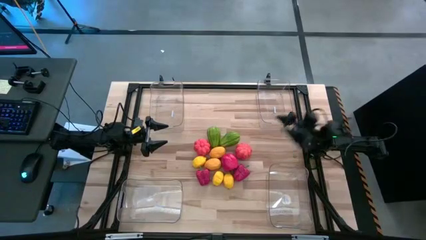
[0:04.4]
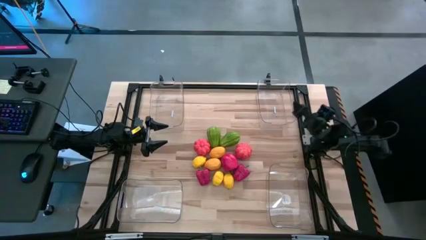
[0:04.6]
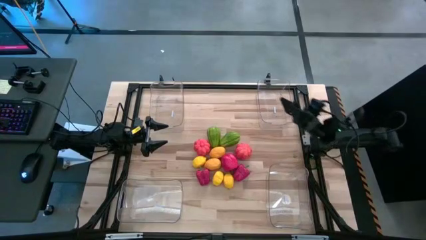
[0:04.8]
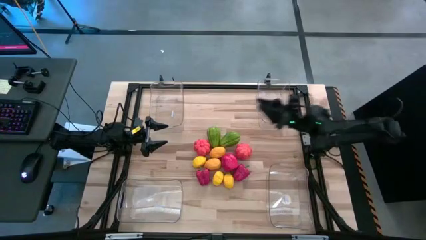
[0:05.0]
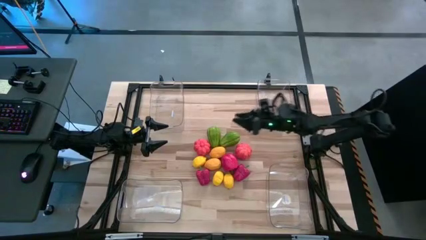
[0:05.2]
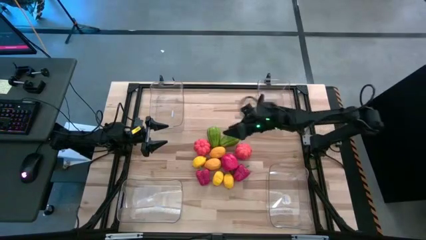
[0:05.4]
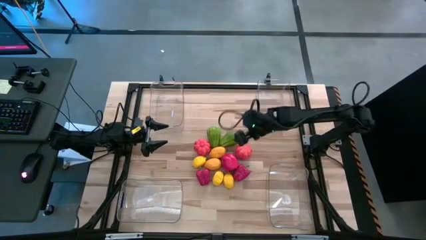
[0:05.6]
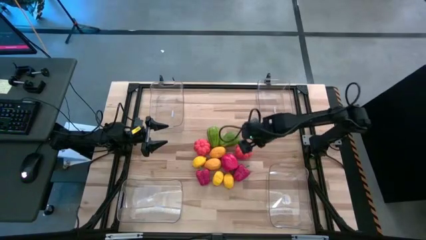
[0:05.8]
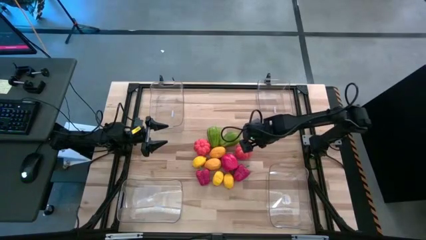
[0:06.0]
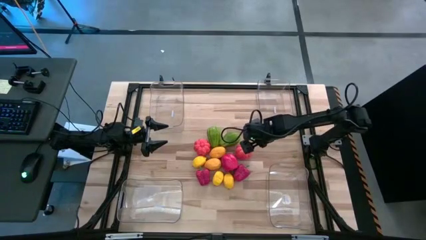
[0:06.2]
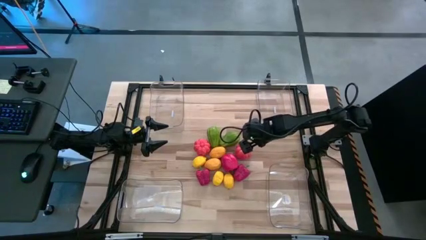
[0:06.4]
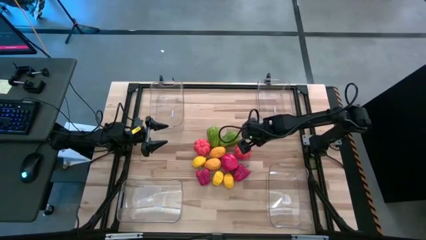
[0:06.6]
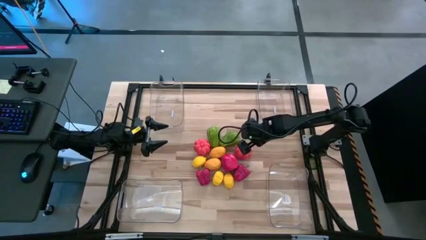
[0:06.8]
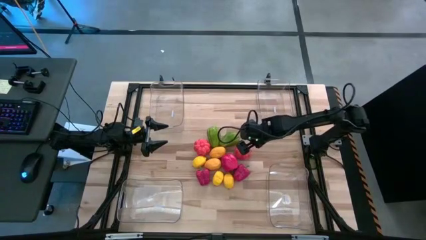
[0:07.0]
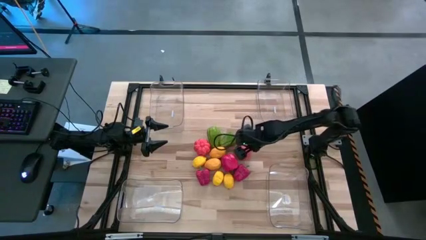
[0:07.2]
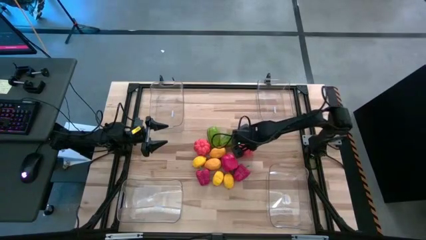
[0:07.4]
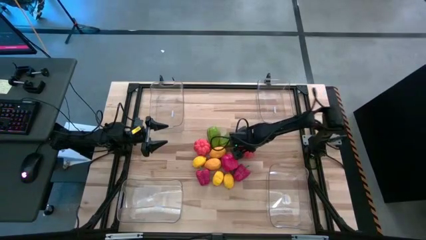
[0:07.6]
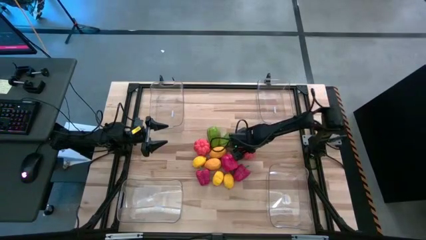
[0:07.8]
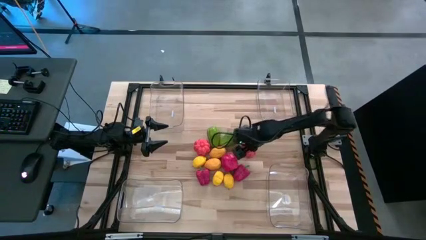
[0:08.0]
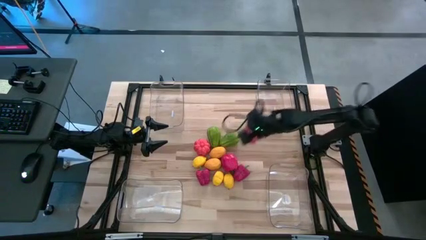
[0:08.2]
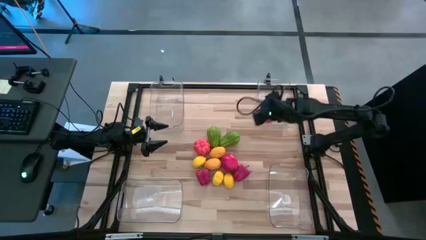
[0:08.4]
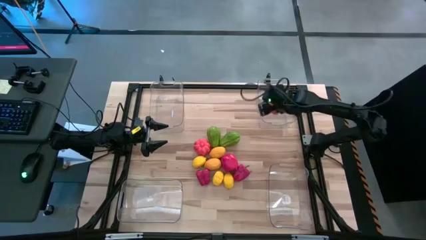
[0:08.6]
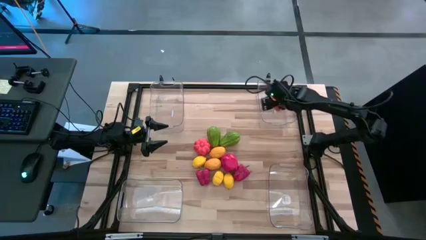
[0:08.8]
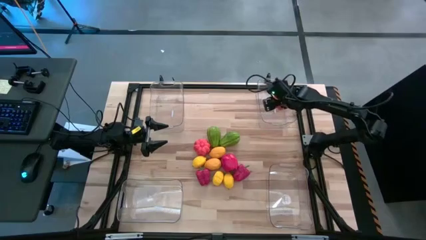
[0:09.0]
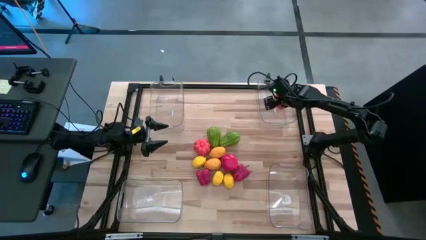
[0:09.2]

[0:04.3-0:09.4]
Task: Sort produce into baskets
Put the orange pumpkin into the top right transparent bin

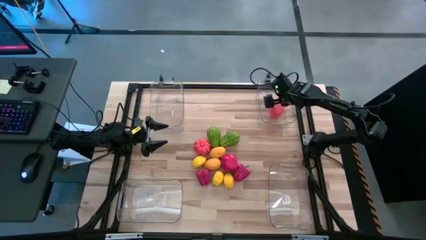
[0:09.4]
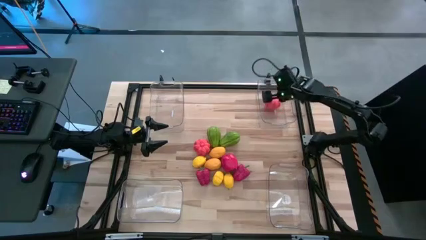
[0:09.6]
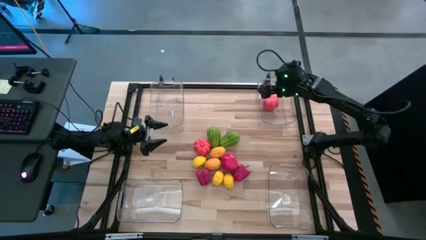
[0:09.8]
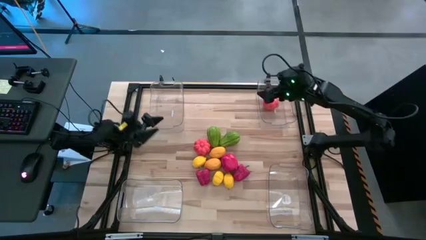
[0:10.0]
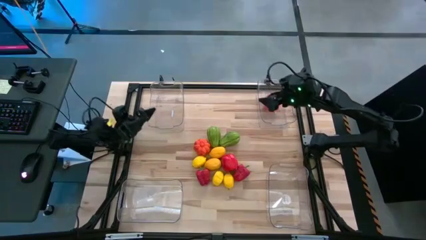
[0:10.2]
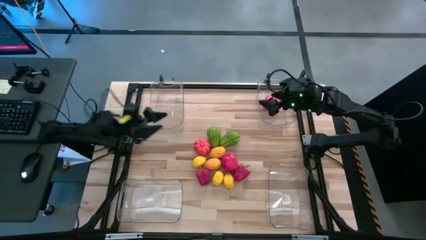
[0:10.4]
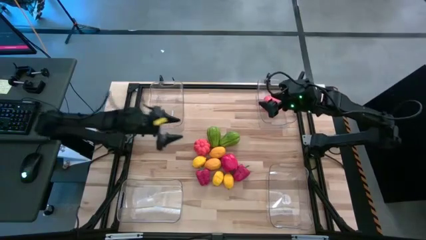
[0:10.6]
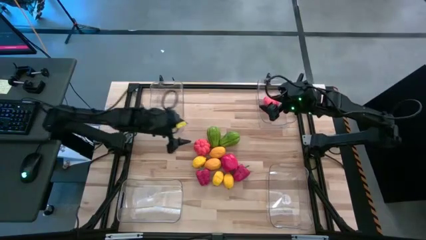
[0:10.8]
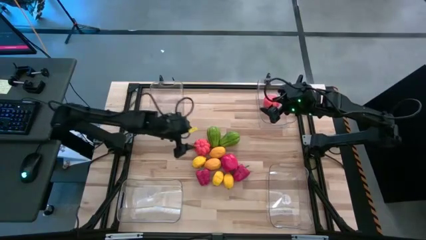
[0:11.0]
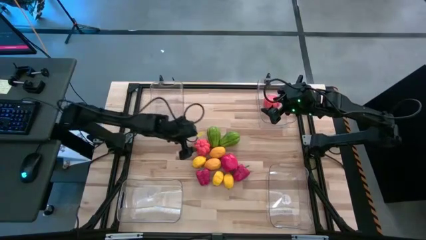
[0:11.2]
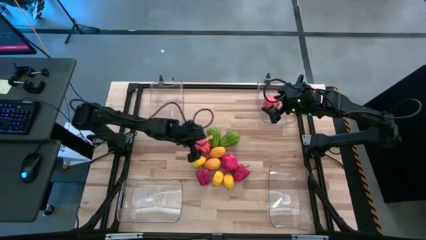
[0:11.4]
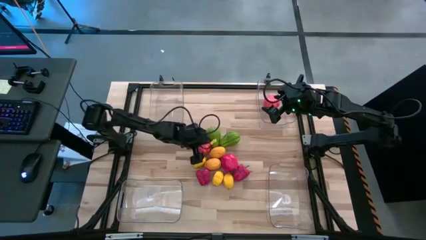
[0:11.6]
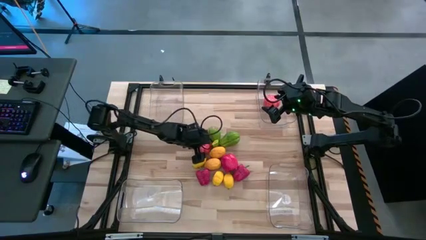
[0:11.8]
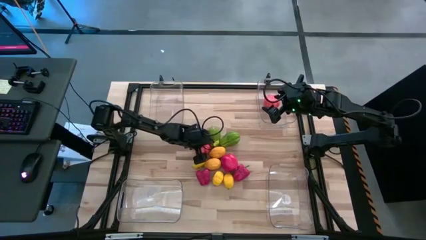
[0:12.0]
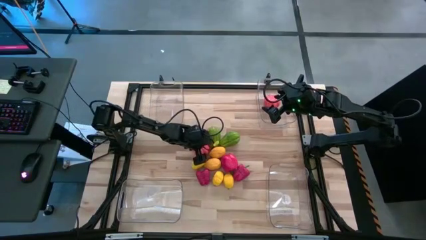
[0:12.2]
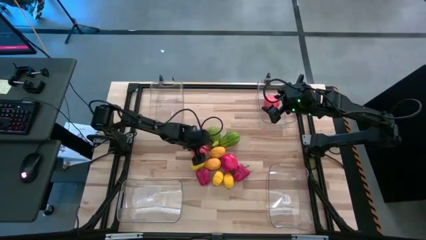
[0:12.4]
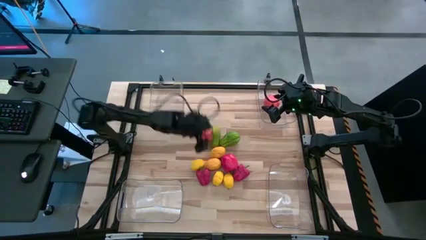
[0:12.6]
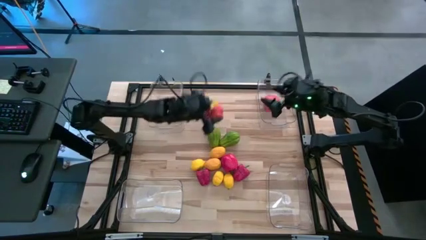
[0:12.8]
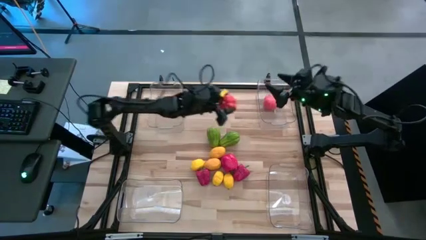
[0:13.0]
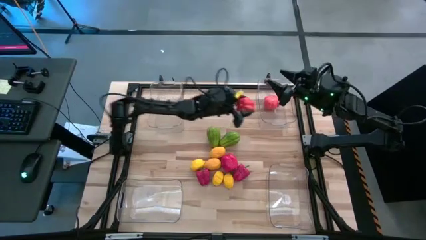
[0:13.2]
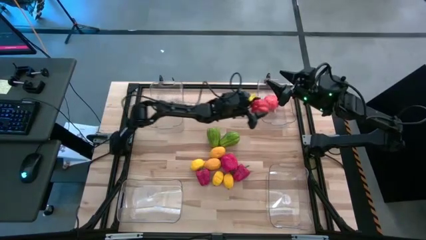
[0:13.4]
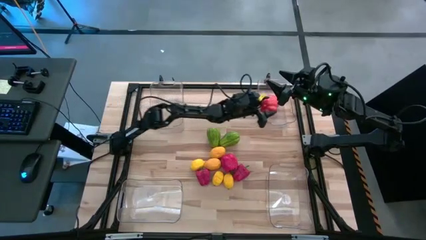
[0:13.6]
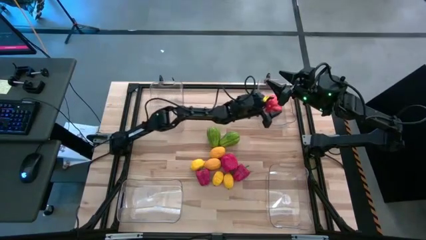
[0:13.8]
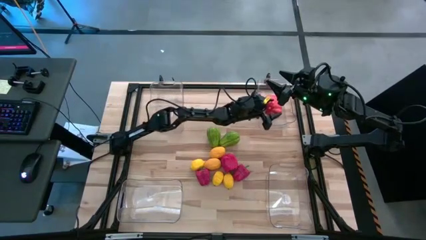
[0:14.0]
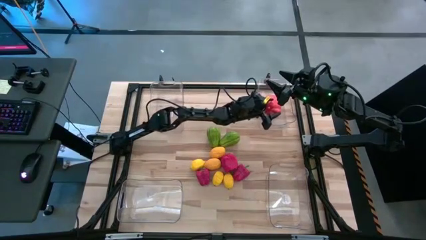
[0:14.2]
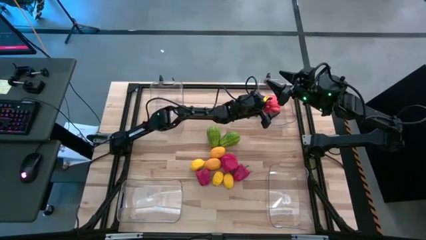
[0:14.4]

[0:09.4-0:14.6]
Put the orange pumpkin into the top right transparent bin

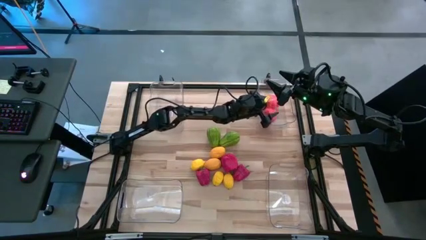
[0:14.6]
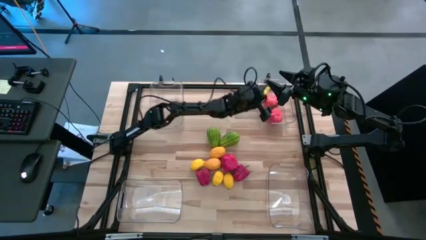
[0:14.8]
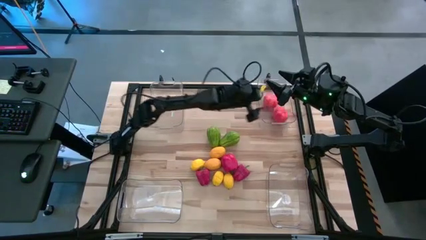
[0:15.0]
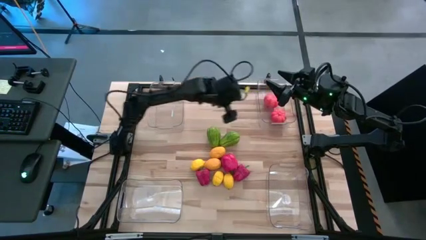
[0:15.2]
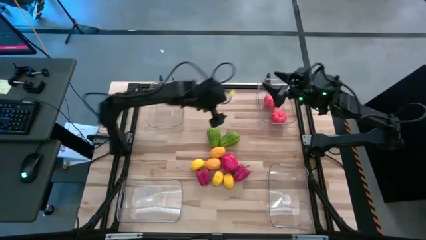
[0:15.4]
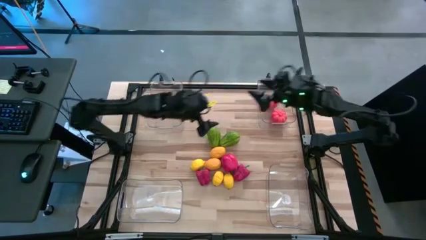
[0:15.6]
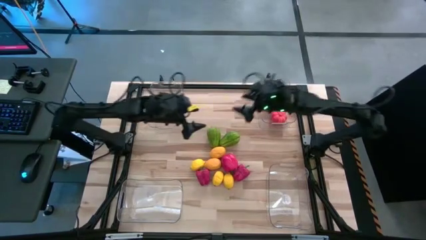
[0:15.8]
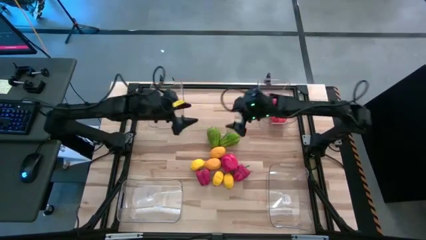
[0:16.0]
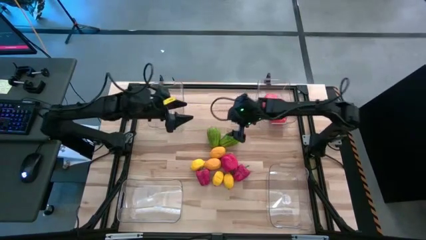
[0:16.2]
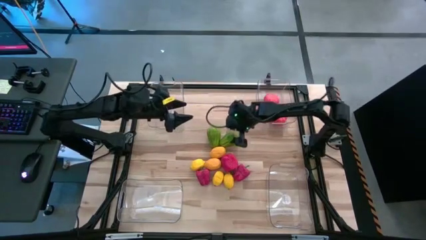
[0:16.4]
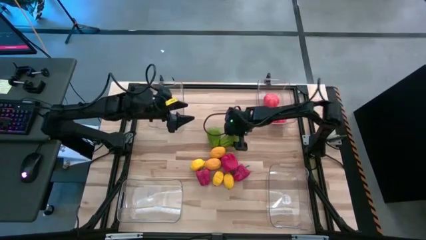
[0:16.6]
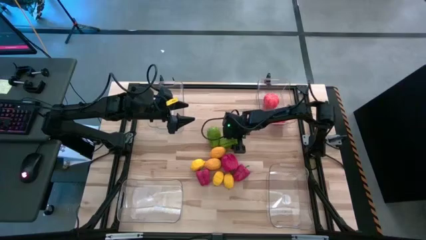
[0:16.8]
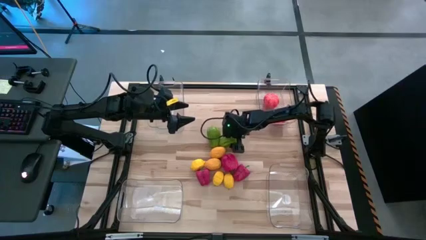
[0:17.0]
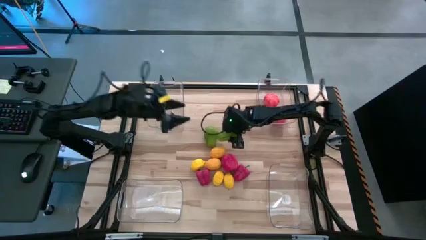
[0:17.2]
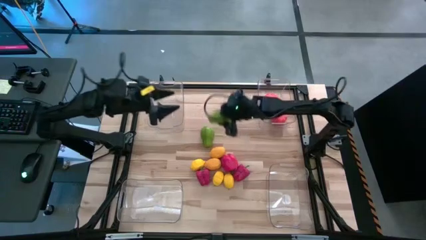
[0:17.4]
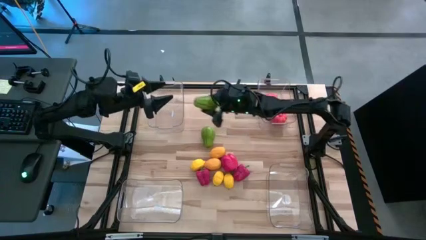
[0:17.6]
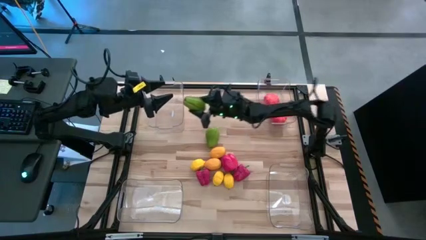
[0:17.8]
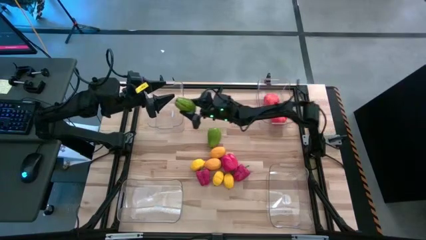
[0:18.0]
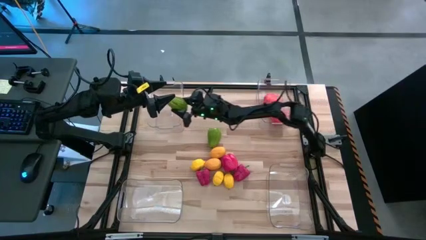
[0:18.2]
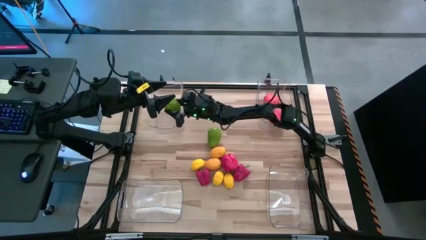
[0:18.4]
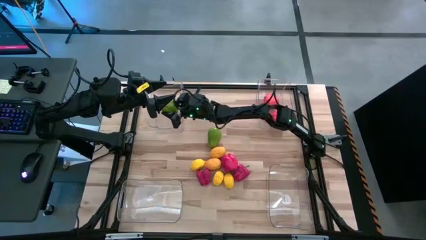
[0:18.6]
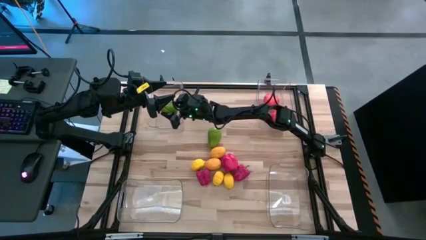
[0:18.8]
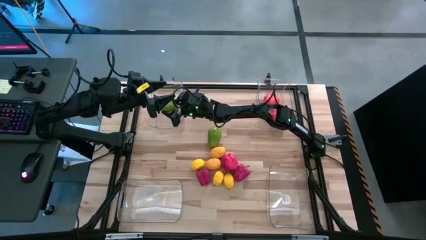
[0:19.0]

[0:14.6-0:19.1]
Put the green chayote into the top left transparent bin

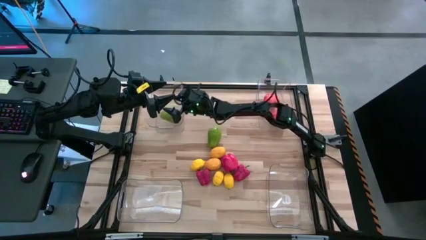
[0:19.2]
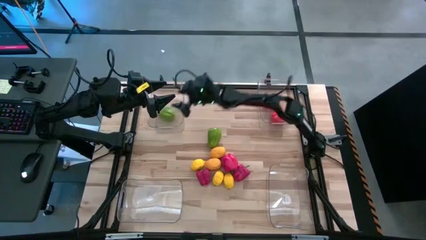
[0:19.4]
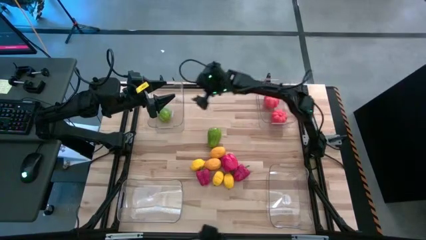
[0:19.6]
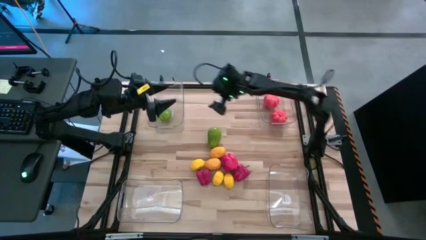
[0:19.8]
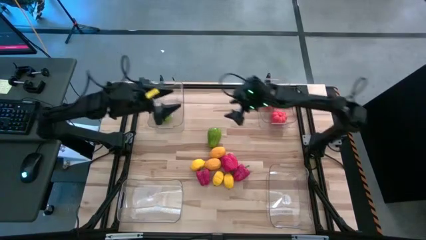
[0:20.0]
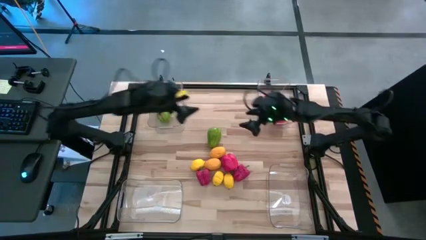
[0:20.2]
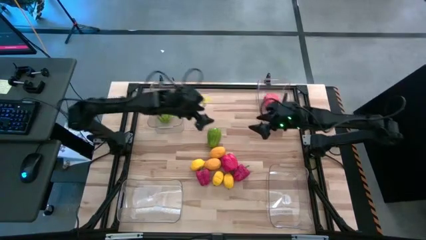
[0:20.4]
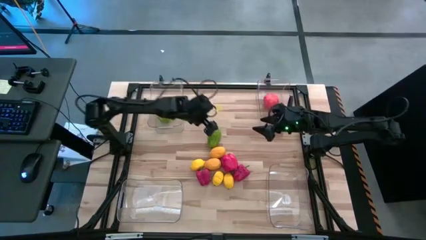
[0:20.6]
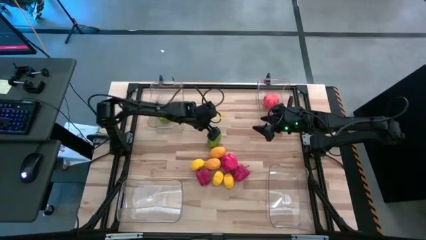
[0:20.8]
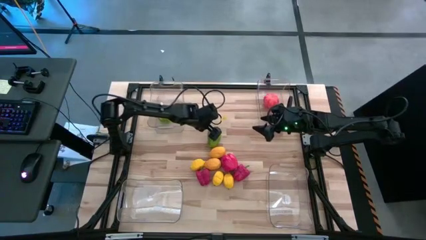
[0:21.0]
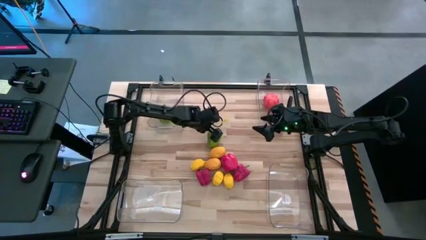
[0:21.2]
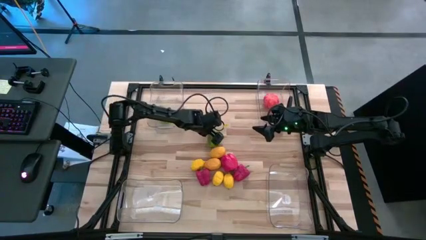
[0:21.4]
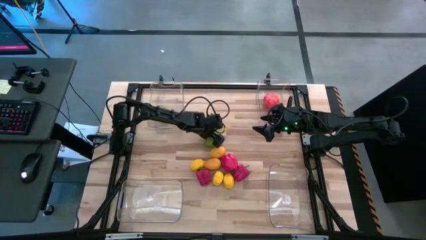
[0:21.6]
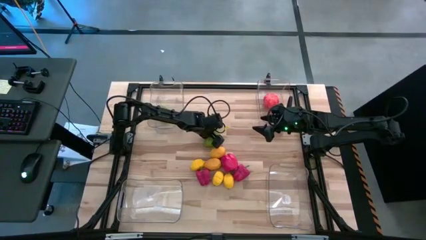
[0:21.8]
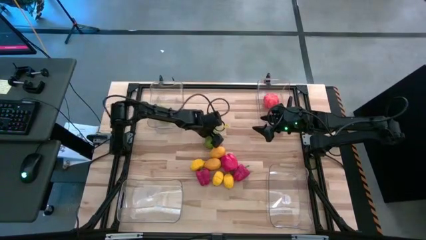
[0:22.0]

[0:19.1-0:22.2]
Put the green chayote into the top left transparent bin
